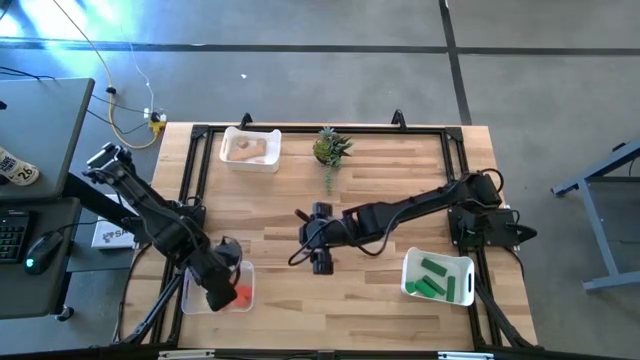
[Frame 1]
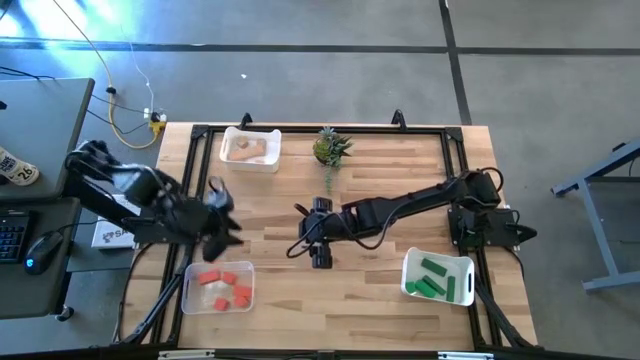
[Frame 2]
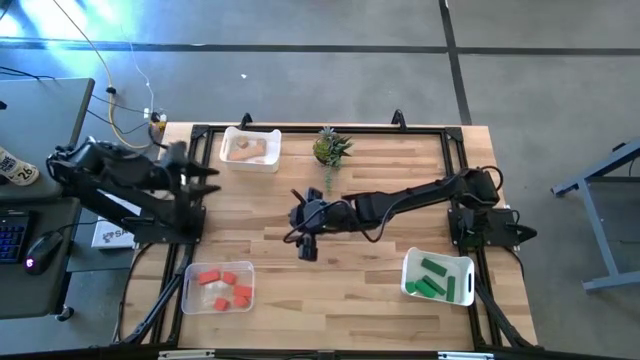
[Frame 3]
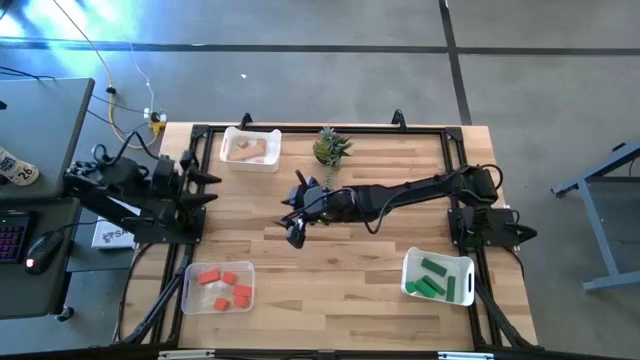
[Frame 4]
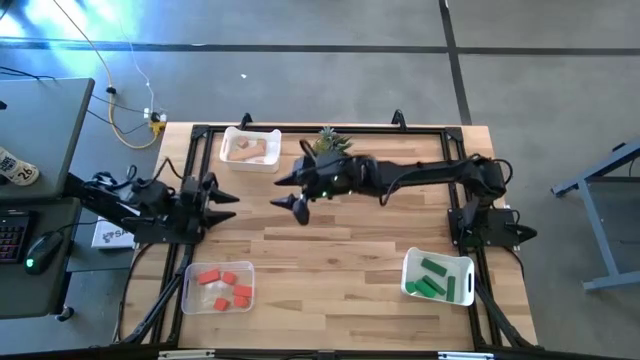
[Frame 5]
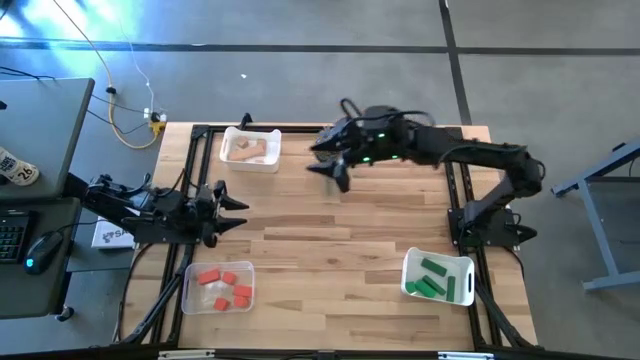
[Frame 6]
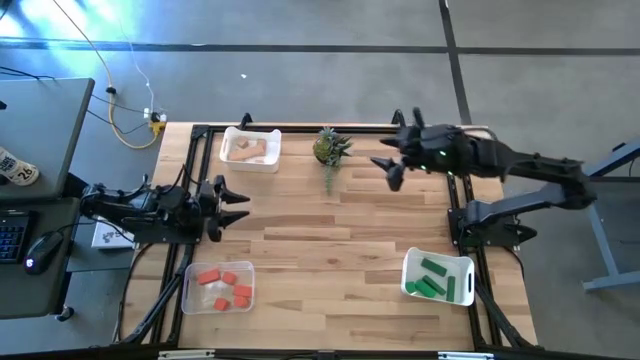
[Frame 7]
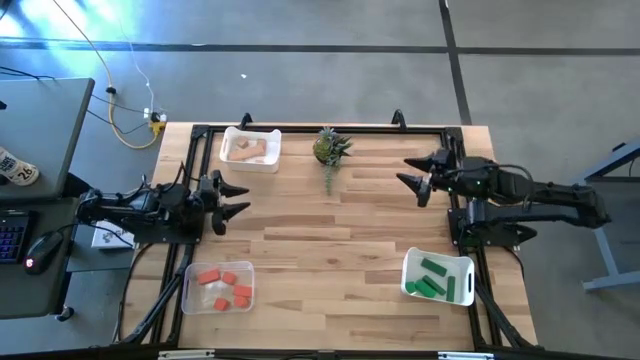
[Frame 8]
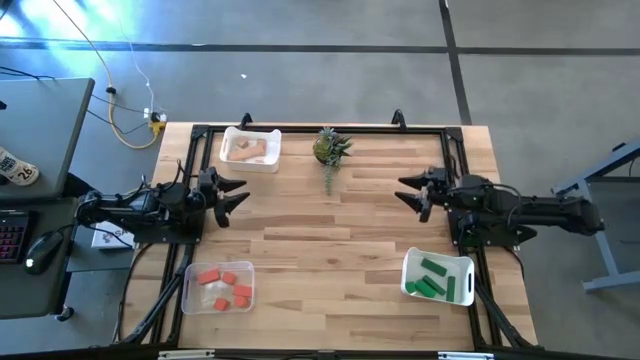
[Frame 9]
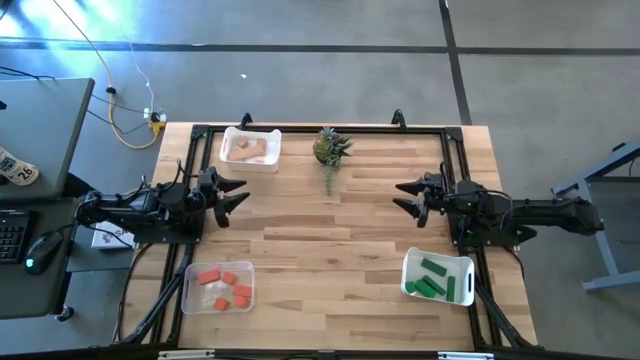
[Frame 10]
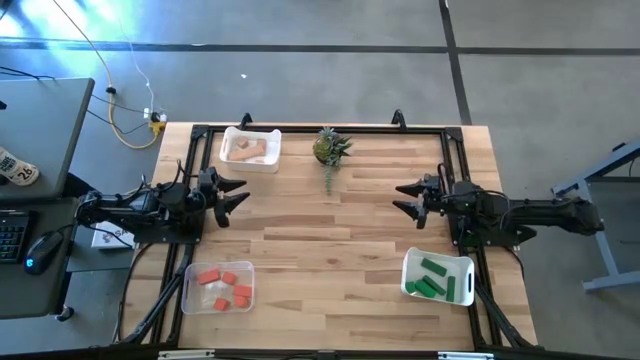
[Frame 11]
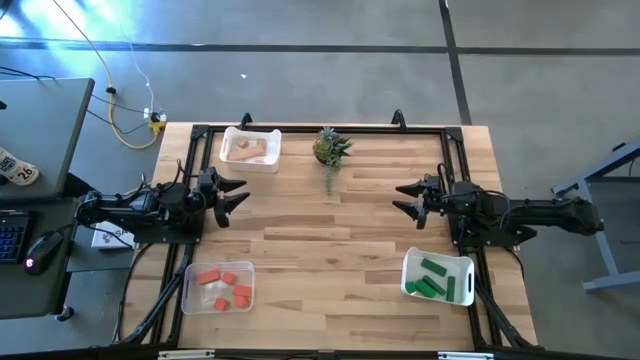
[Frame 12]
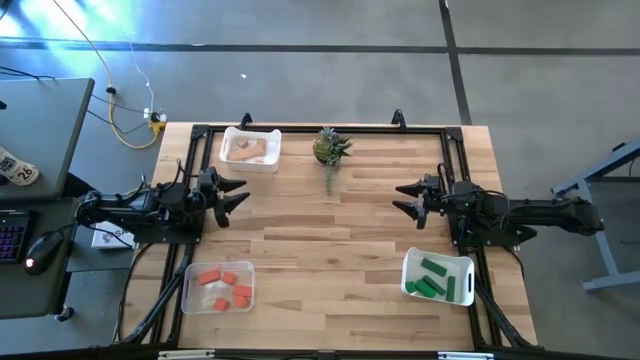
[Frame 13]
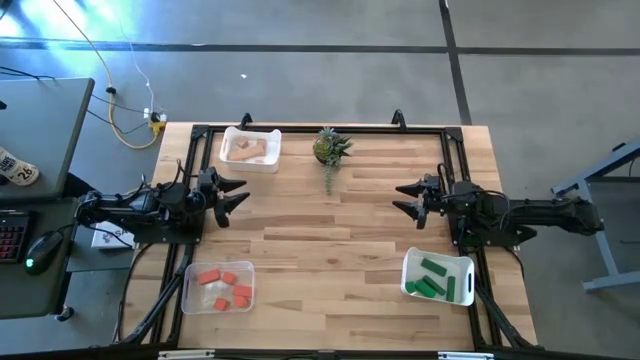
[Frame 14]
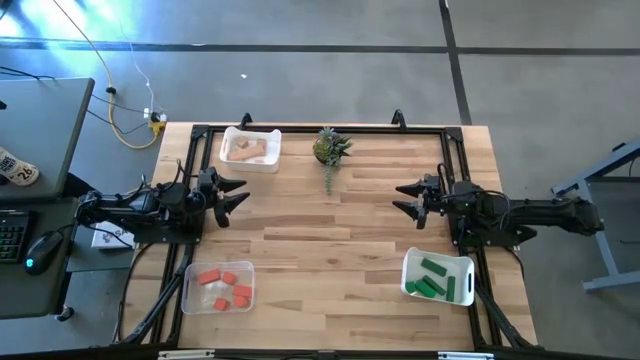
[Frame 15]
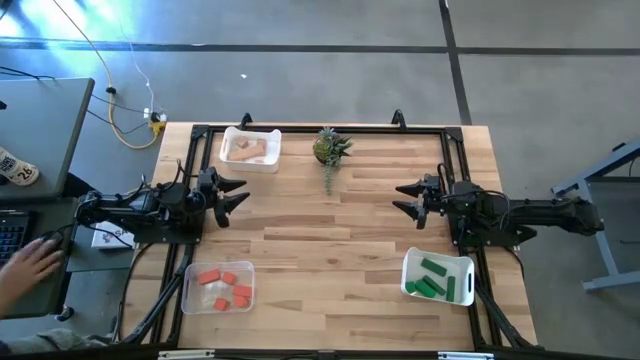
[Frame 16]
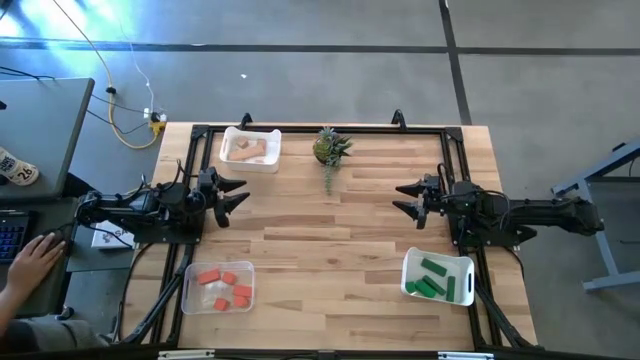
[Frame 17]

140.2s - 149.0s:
Task: Sort & place blocks by color
Return to Home Position

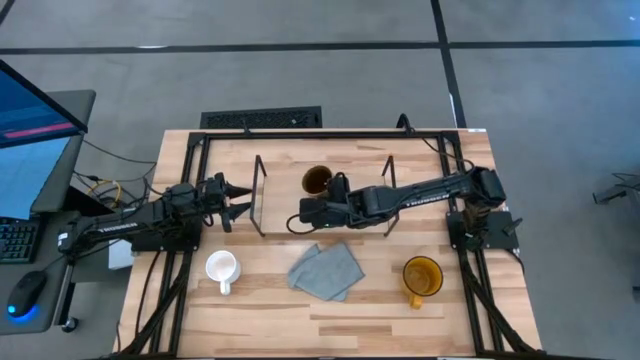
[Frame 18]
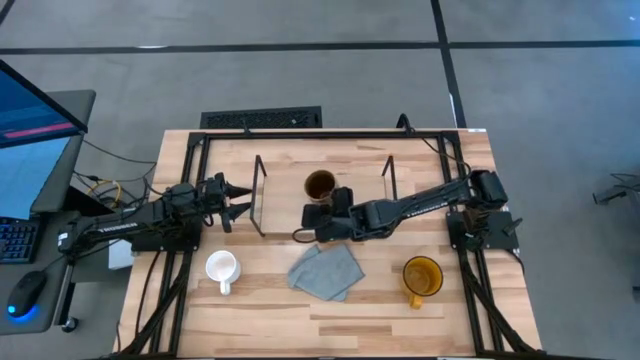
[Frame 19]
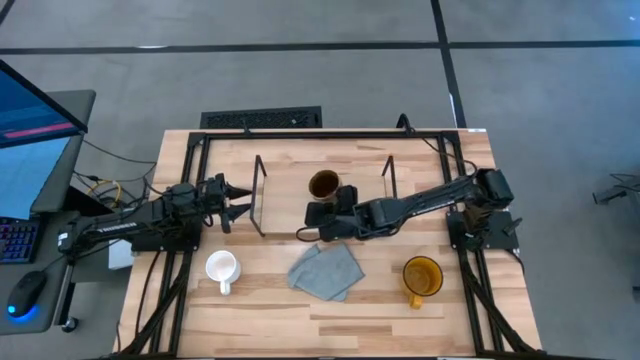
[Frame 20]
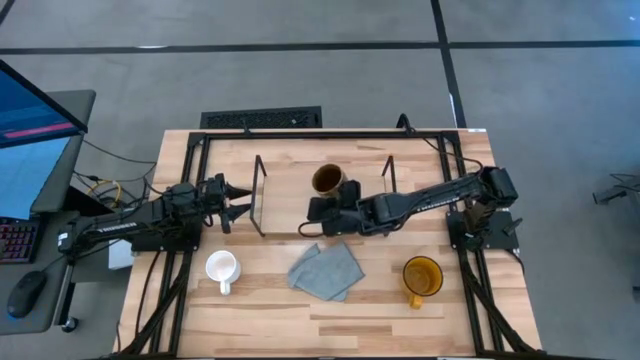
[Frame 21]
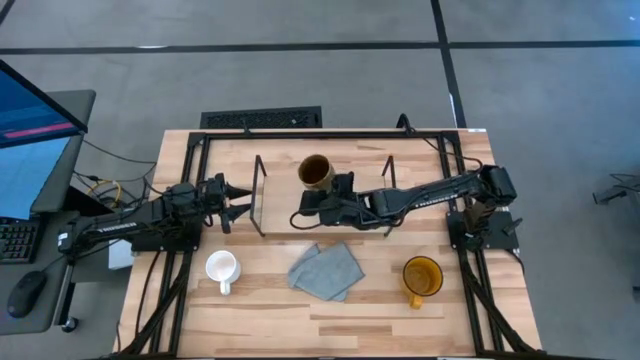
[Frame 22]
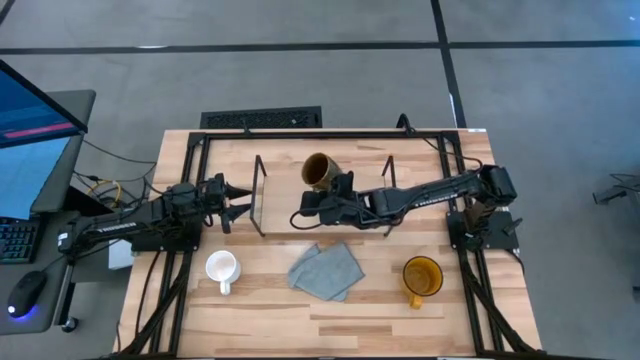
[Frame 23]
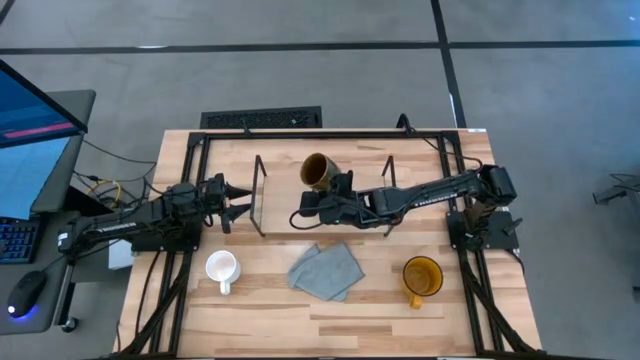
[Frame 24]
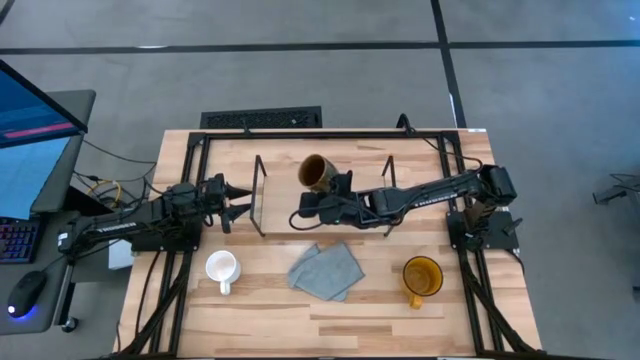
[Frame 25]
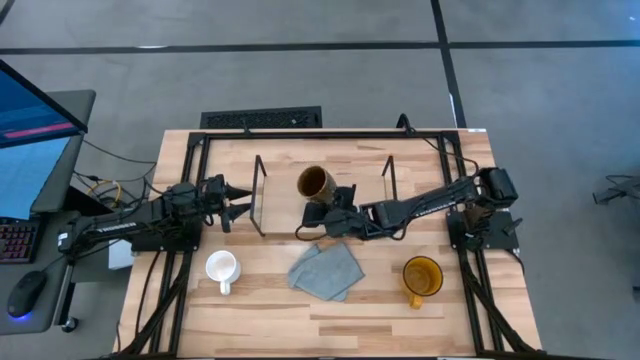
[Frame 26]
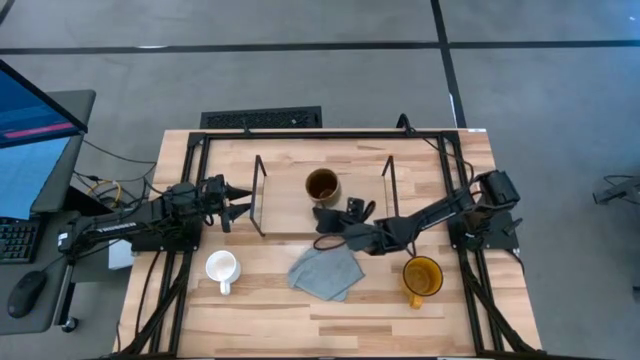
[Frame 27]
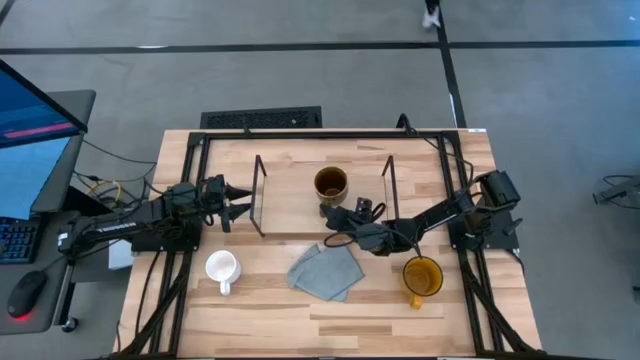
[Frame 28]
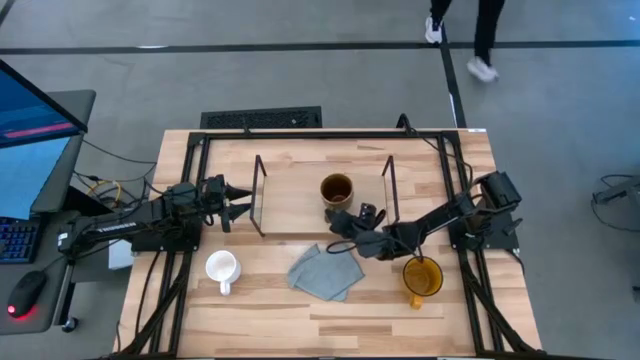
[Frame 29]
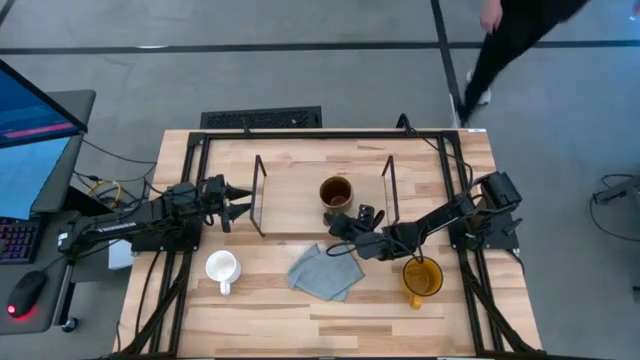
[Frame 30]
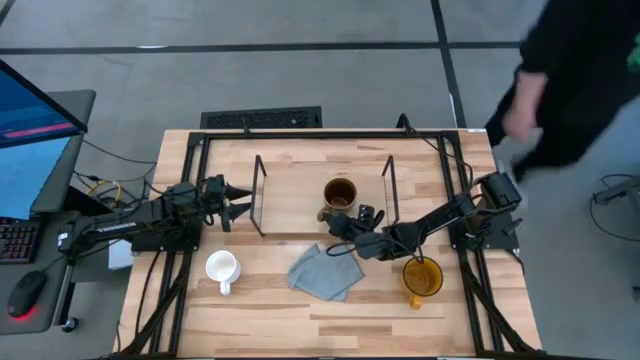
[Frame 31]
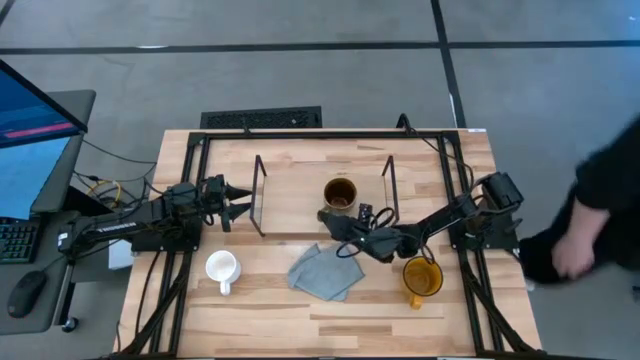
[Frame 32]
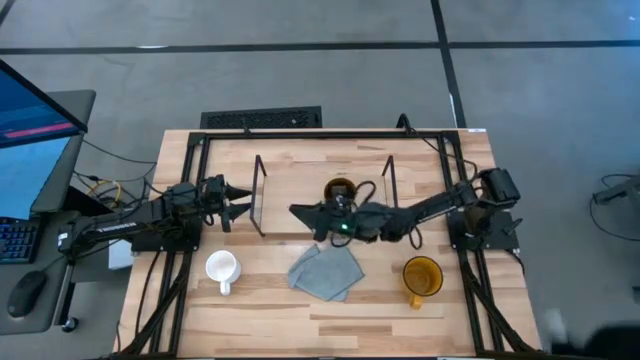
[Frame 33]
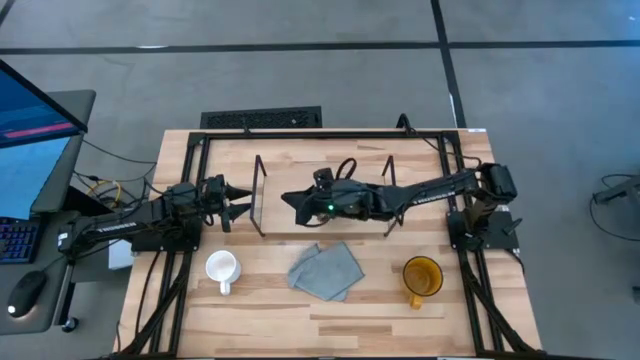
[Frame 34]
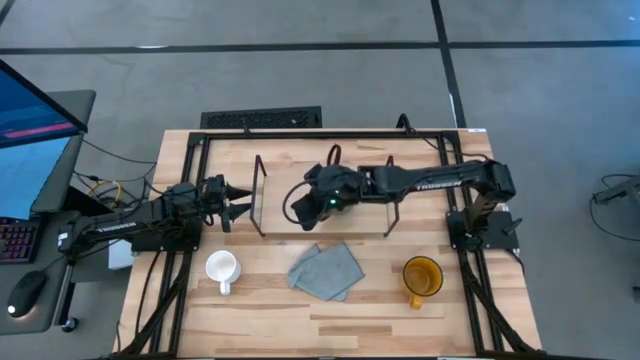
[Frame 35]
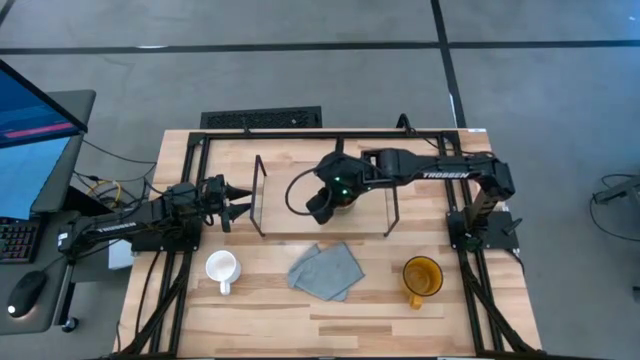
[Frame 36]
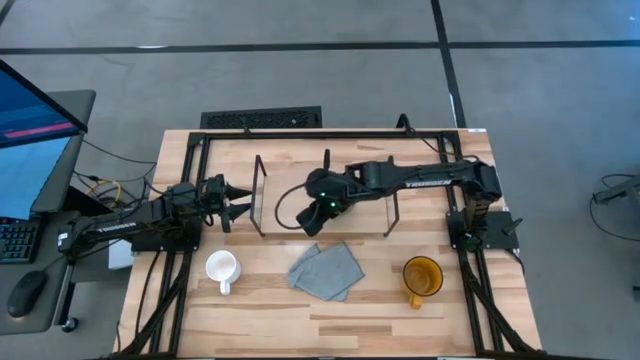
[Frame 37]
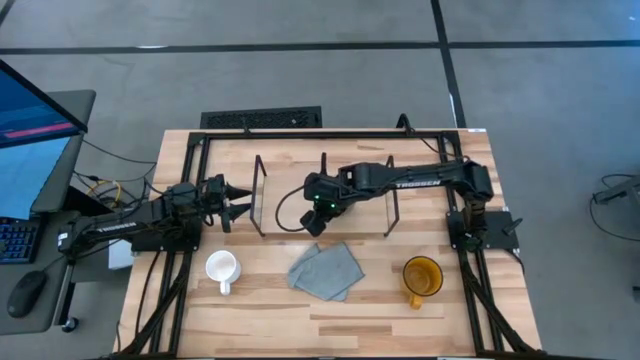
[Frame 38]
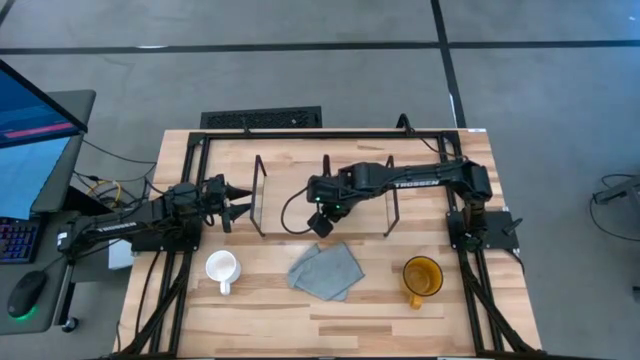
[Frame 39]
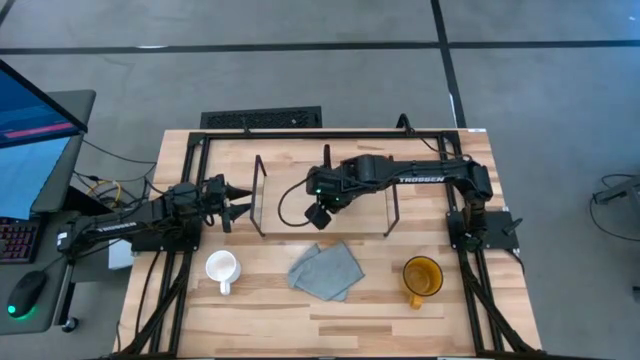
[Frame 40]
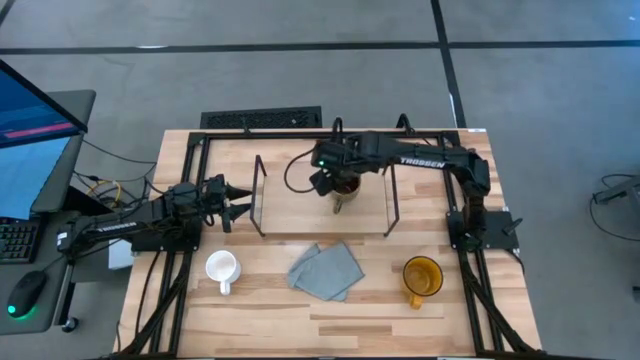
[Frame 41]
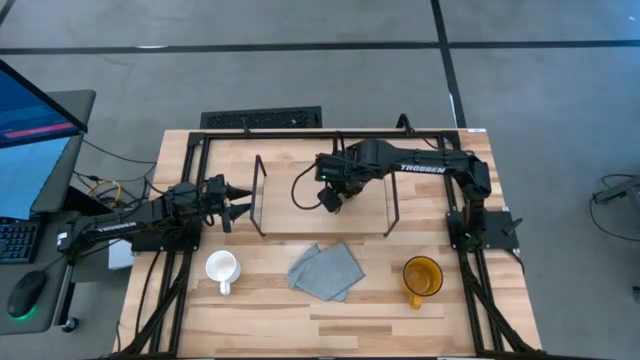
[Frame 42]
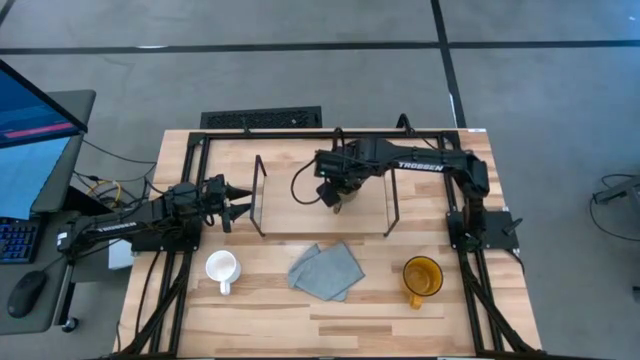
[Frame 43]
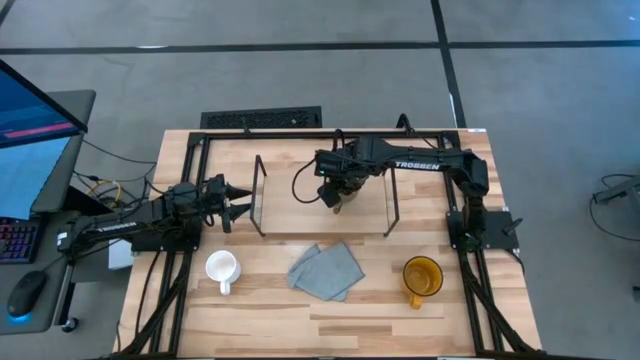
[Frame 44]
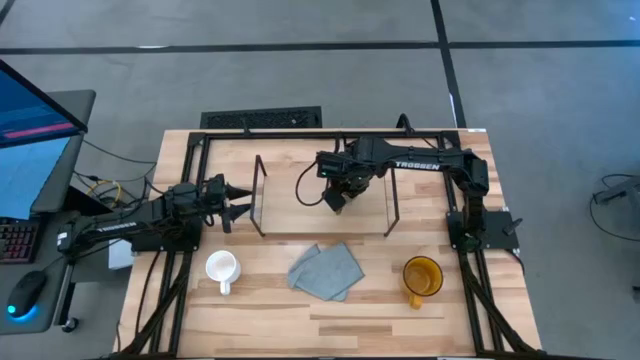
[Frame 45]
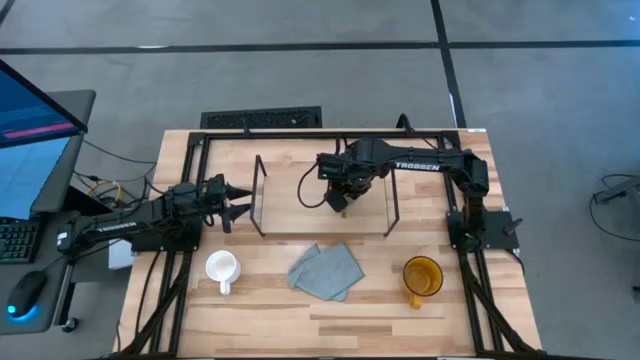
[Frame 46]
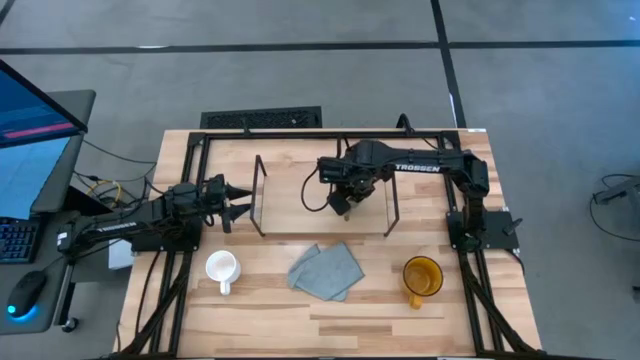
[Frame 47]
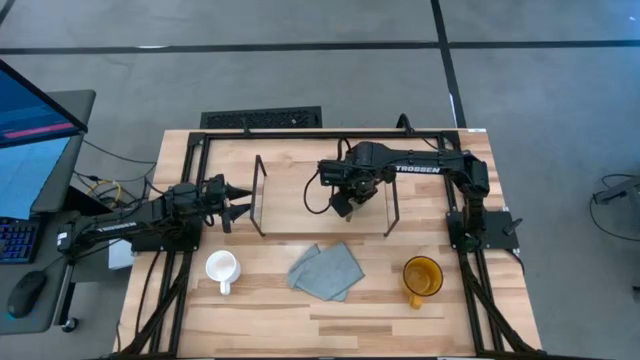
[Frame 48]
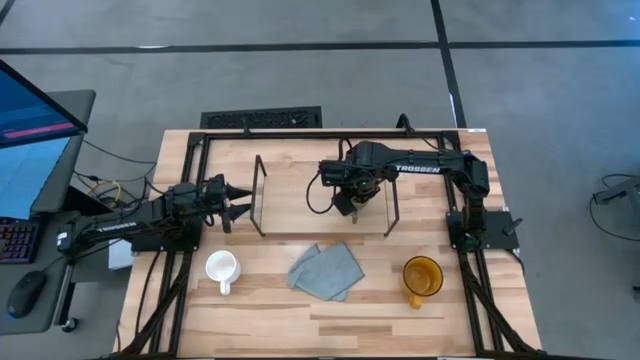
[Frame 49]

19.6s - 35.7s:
Task: Stack small to large cups/mugs on shelf
Put the brown mug on the shelf
